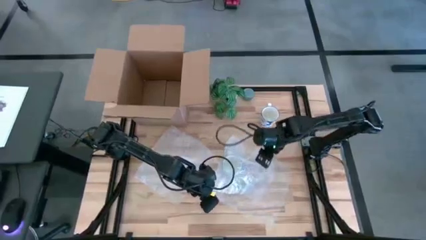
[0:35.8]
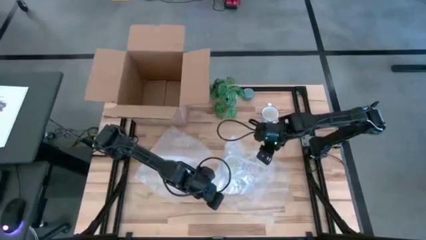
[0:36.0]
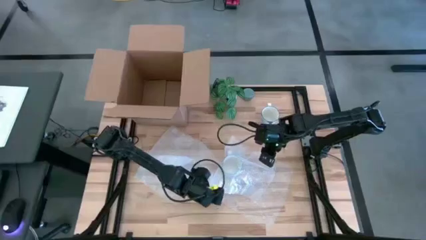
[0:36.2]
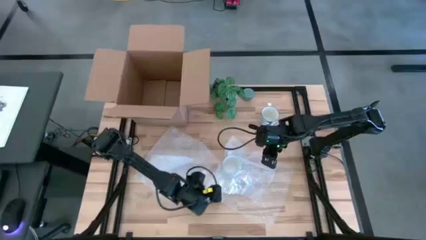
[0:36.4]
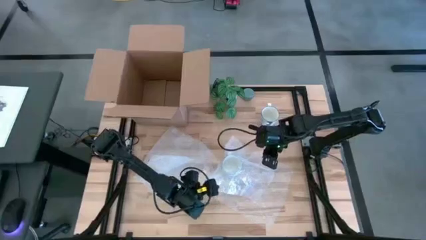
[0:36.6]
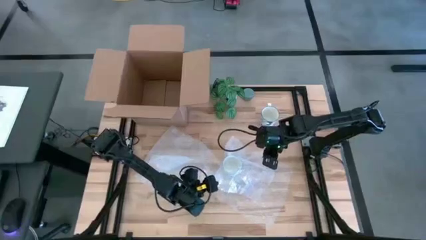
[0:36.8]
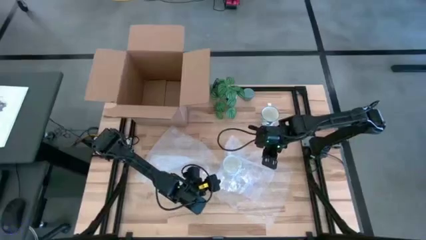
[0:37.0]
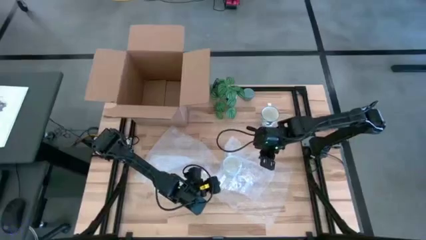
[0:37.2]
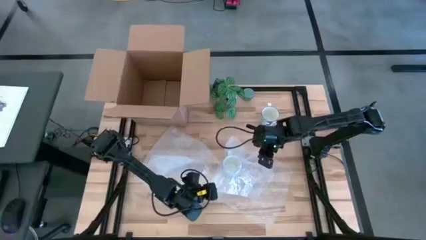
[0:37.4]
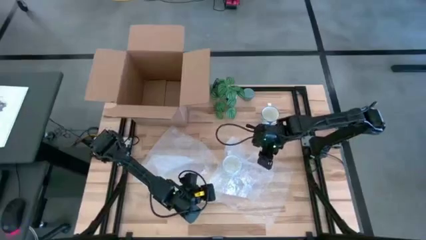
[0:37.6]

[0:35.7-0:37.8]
Task: wrap mug
Wrap the green mug with the bubble wrap

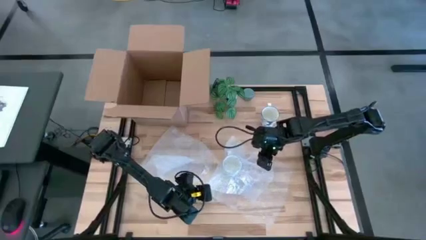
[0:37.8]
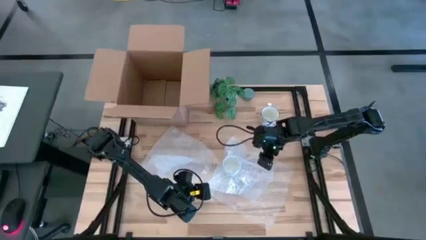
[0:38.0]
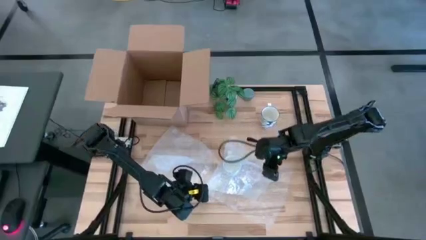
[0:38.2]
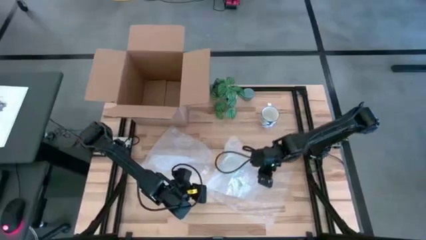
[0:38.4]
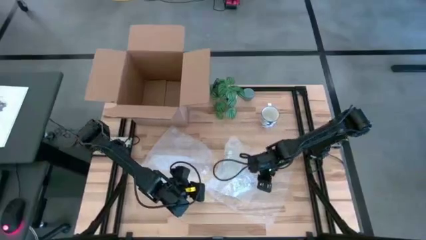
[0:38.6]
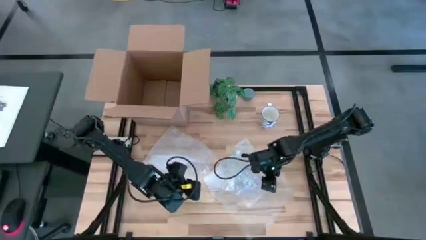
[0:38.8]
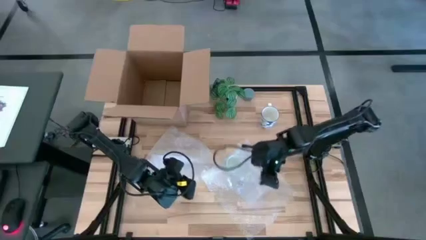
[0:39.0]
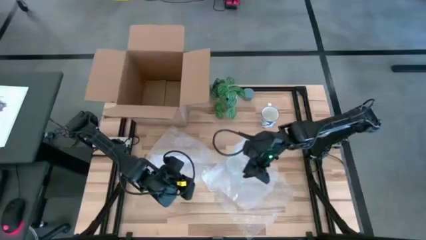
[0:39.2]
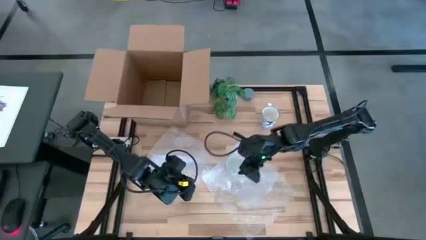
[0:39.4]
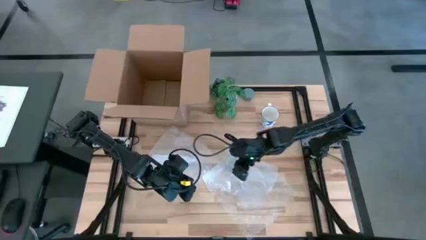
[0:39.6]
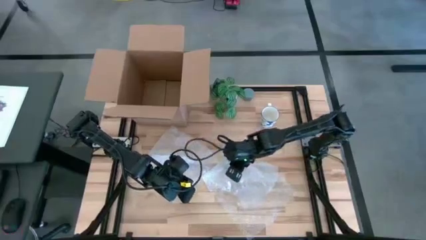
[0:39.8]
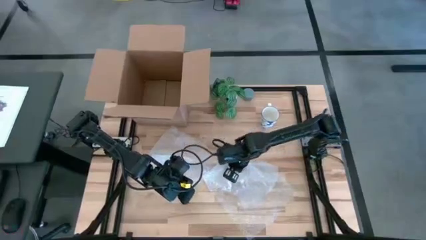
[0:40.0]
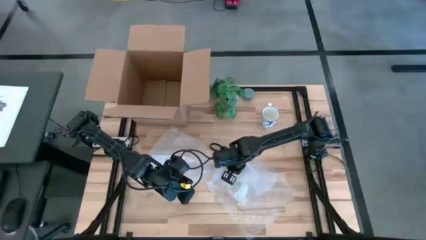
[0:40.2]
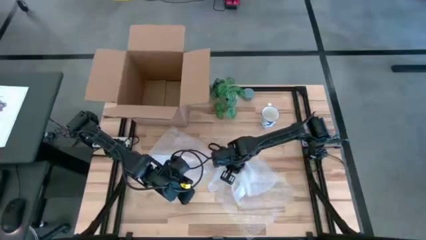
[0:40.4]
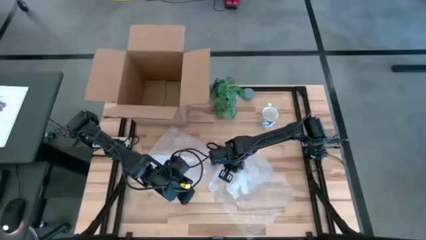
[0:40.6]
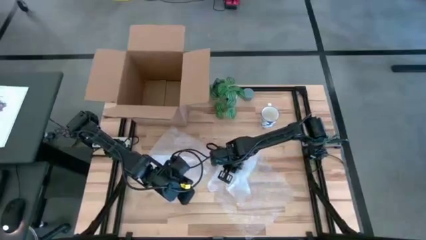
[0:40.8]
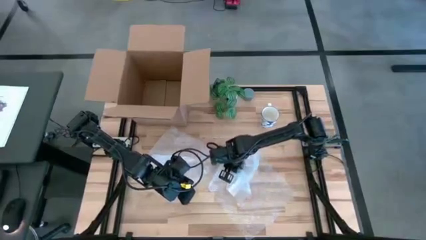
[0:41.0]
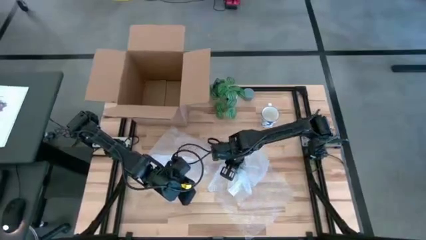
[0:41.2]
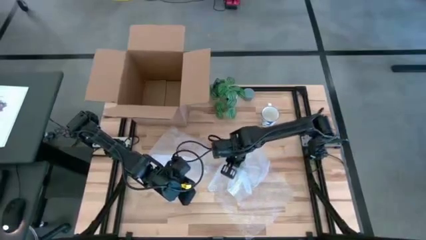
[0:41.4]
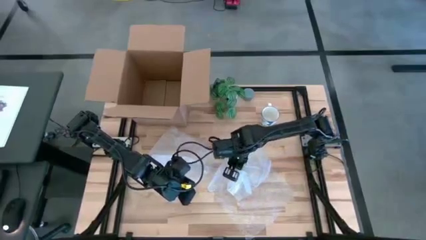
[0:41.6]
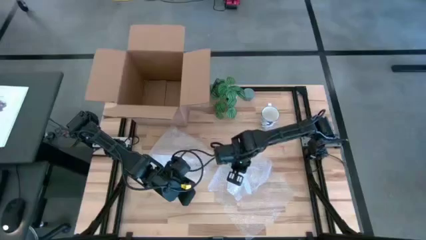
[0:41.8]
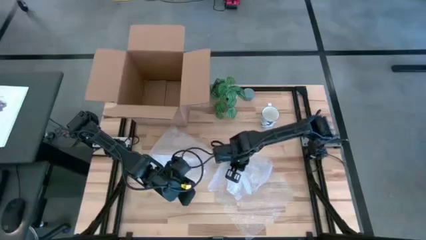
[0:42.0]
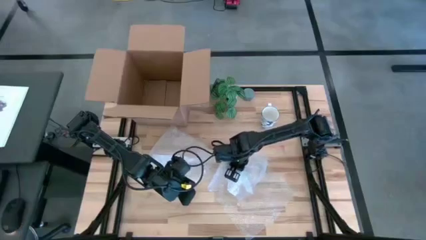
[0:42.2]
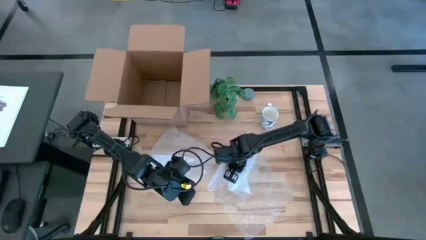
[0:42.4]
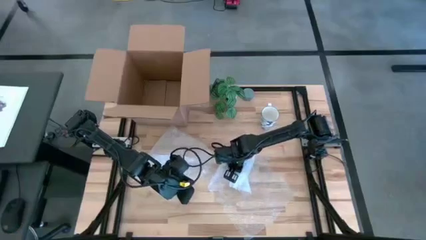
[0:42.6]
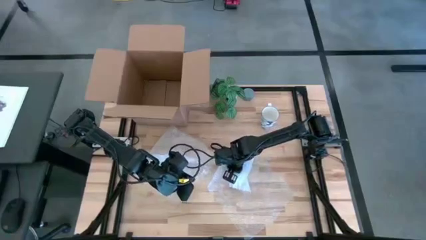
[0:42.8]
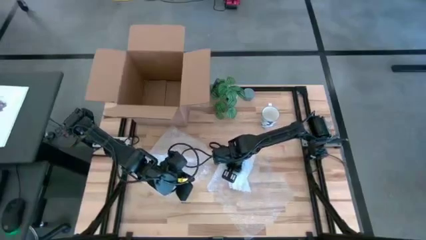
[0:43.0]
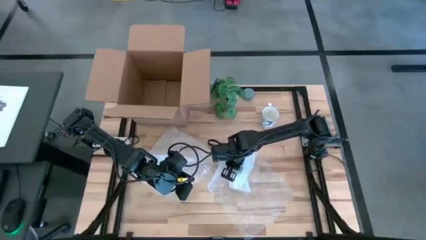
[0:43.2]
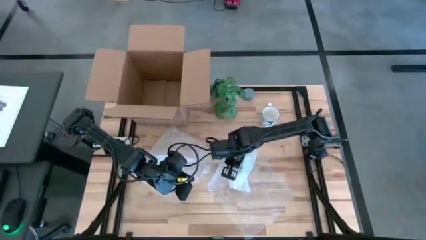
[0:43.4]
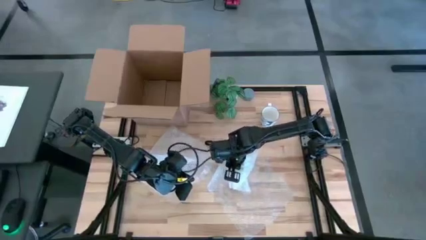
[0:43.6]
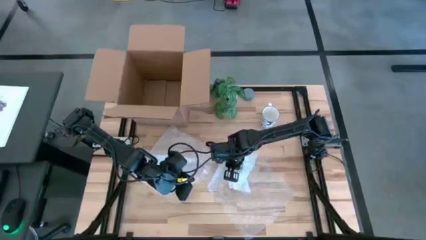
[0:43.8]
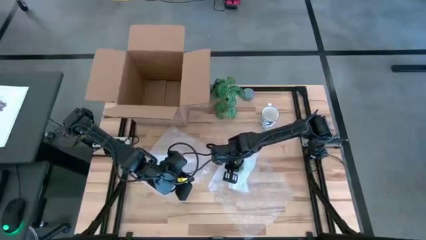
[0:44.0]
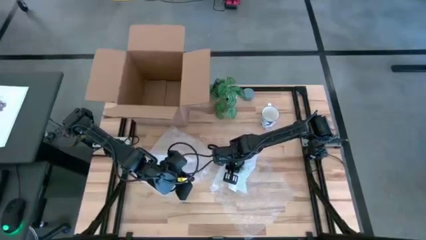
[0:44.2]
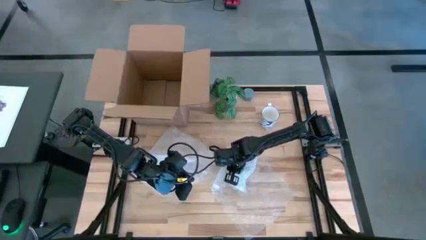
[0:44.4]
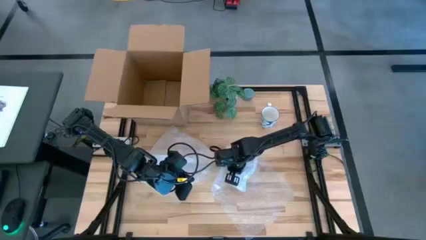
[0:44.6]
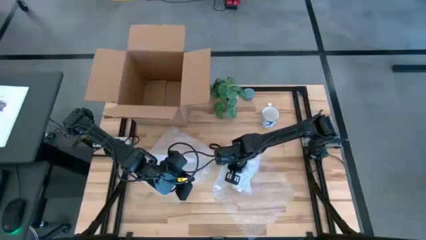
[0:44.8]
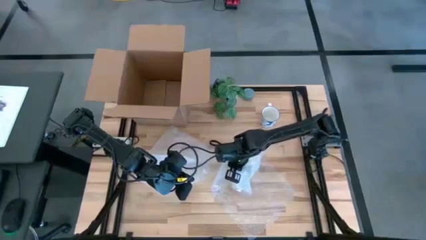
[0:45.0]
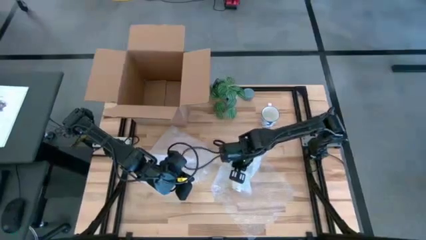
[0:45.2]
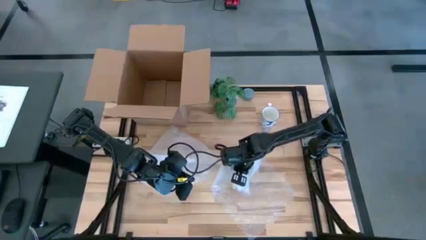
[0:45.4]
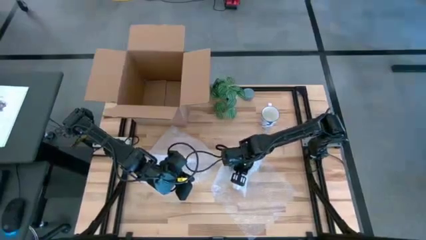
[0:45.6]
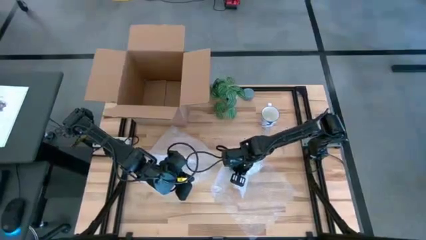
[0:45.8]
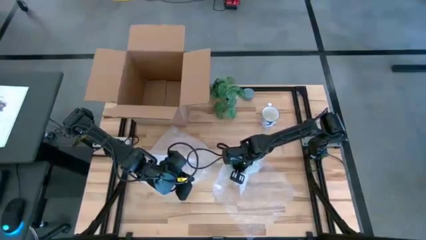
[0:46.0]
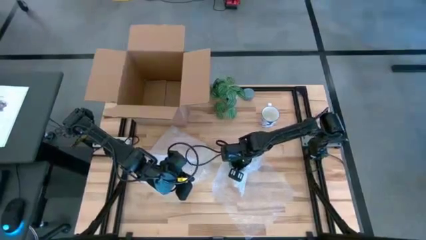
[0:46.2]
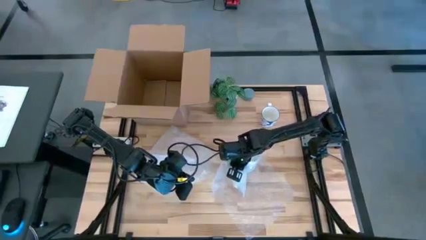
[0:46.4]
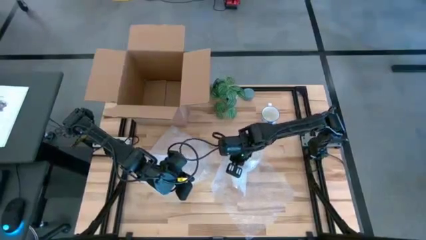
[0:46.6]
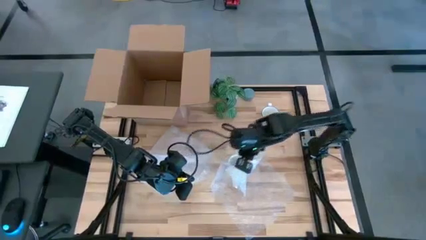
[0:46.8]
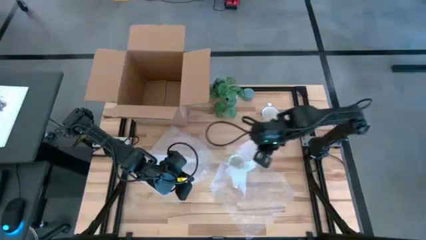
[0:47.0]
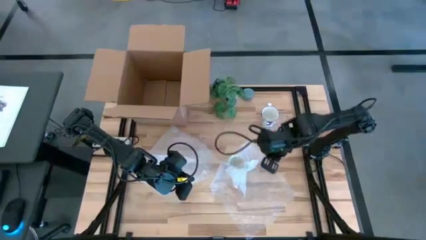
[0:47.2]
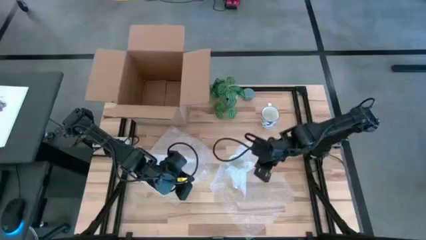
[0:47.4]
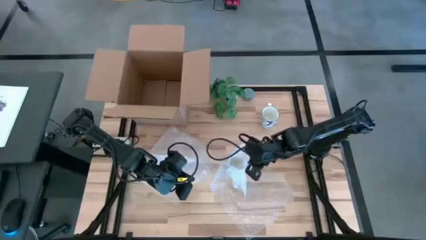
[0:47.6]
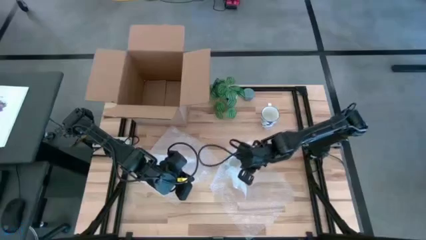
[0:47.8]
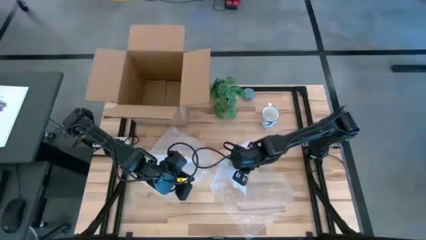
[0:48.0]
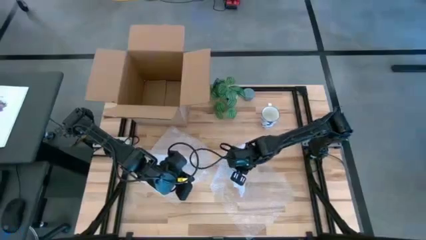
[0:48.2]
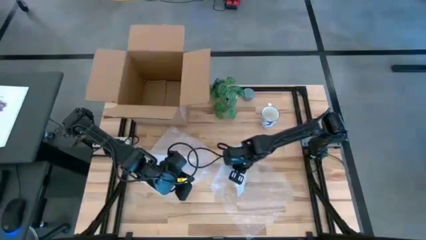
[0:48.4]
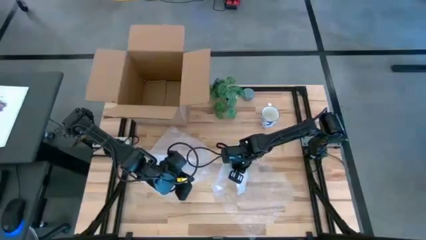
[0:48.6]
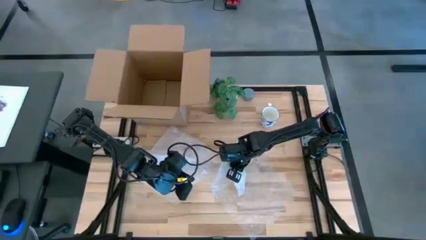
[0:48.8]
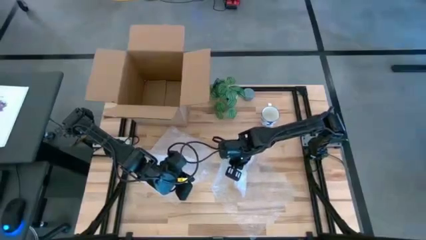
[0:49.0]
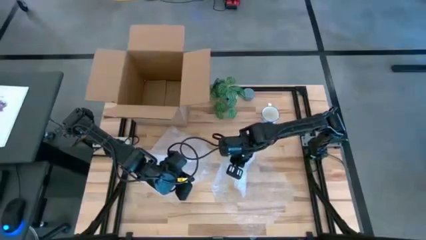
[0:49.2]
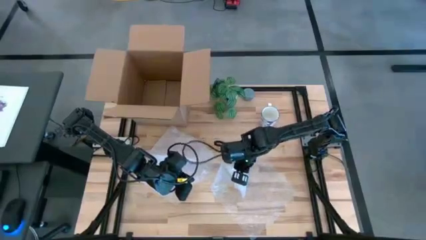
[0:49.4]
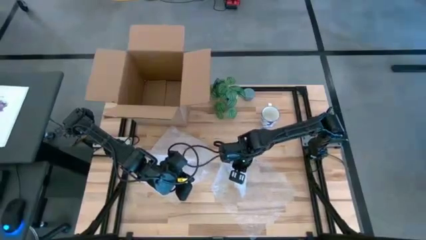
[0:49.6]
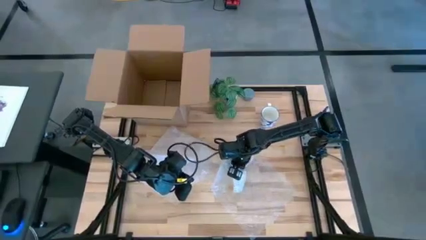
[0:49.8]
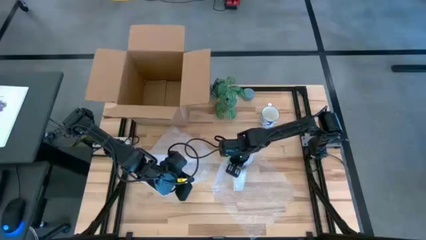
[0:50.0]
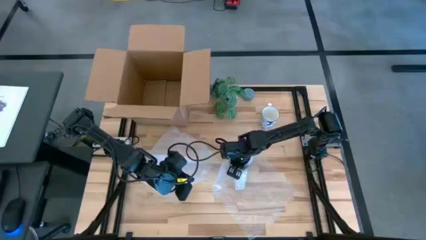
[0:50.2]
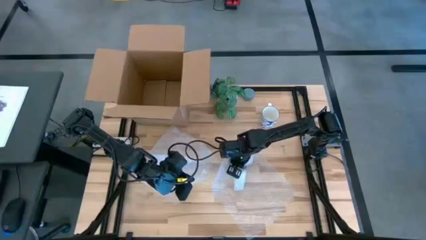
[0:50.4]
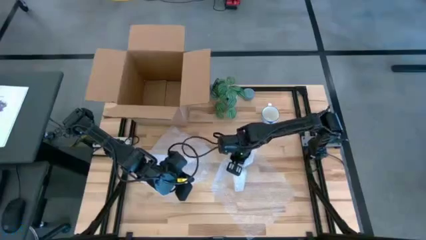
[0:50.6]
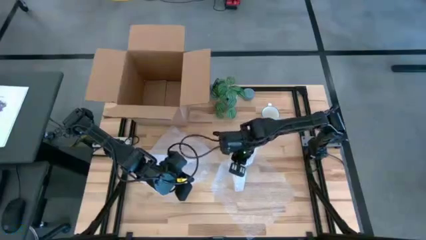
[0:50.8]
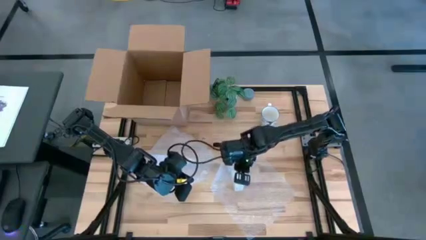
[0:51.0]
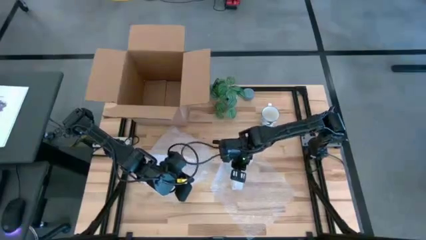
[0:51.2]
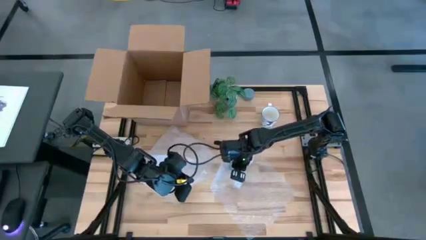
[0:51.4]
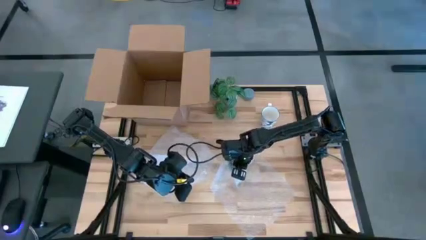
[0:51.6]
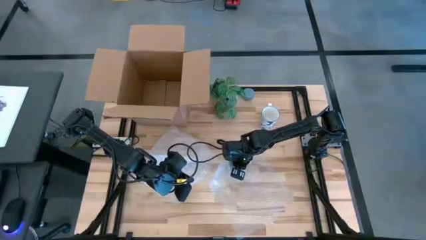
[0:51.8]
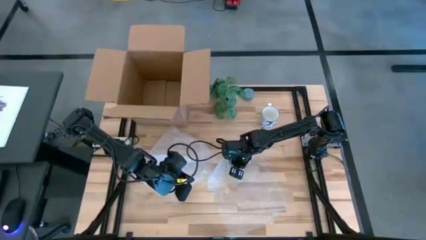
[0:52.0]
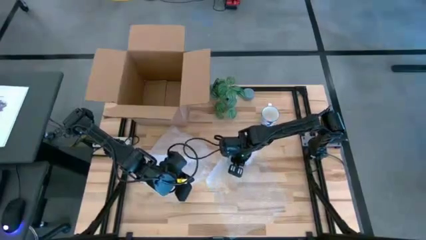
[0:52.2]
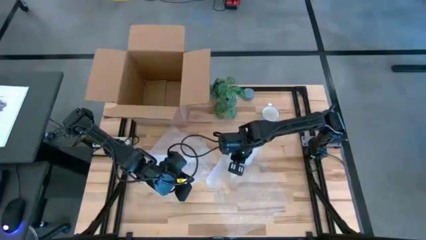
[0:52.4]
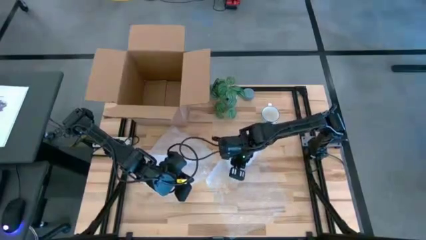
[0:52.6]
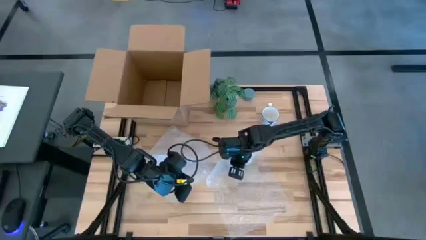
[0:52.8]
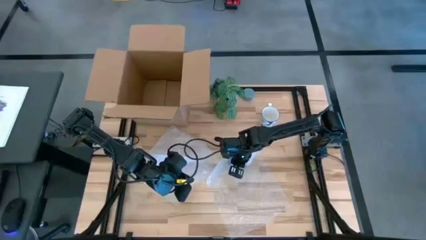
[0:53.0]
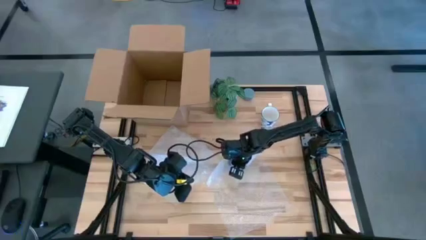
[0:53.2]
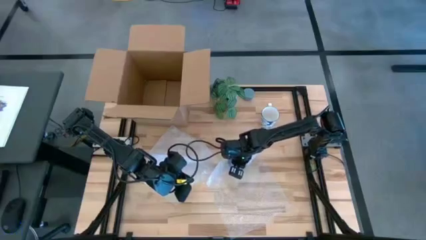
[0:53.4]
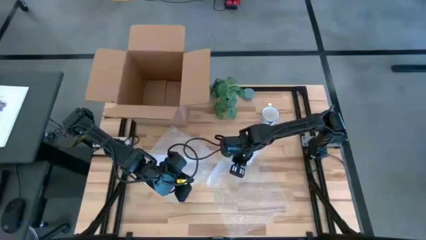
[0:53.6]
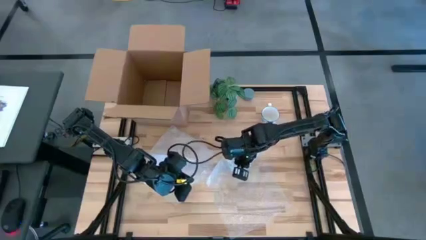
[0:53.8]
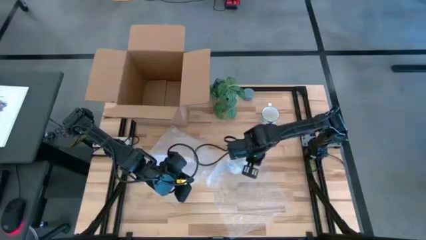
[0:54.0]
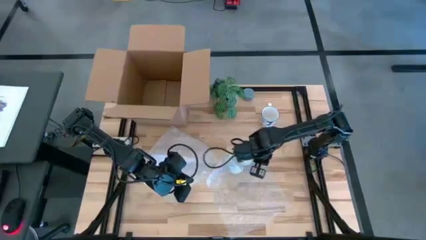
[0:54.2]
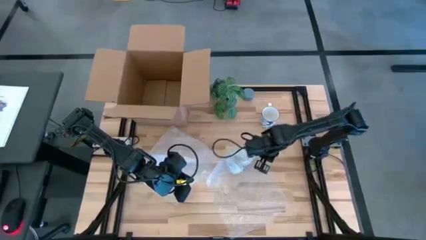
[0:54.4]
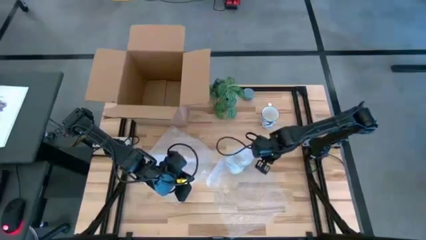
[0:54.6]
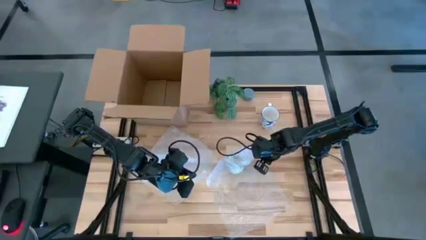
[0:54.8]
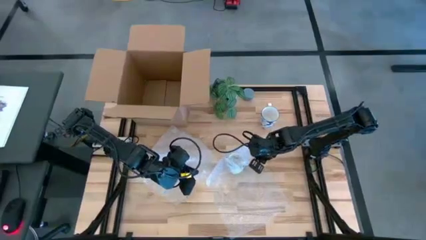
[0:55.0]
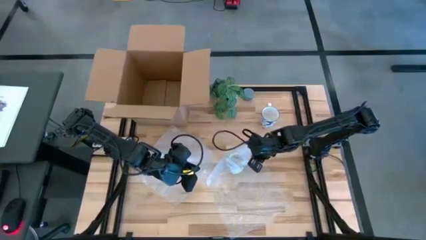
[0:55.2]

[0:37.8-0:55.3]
Wrap the green mug with the bubble wrap
